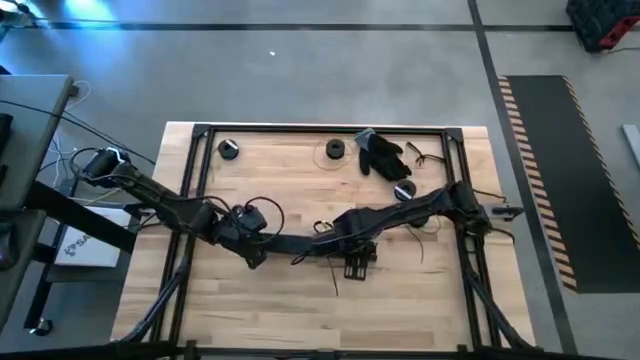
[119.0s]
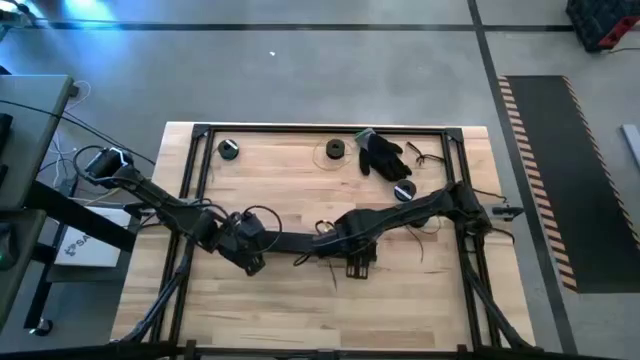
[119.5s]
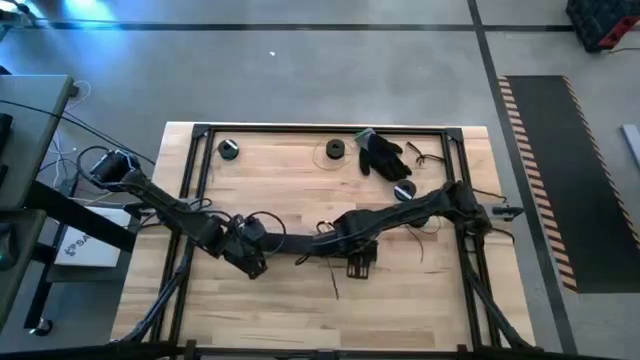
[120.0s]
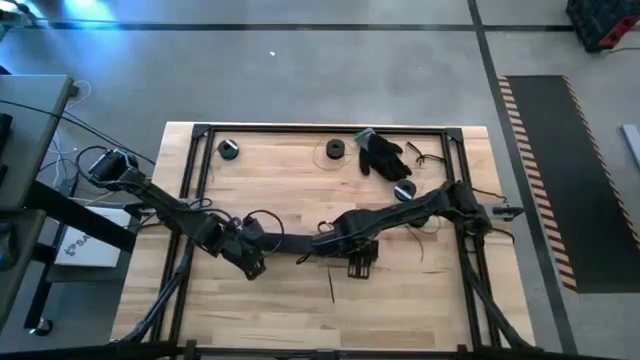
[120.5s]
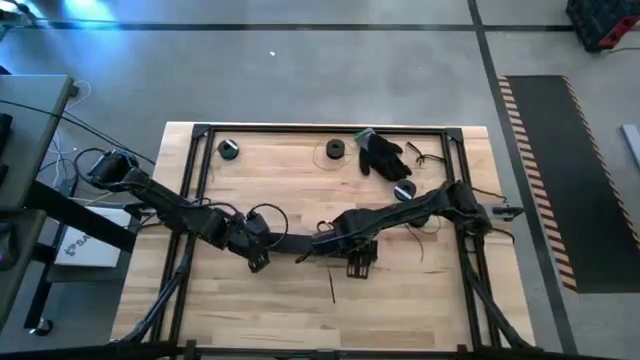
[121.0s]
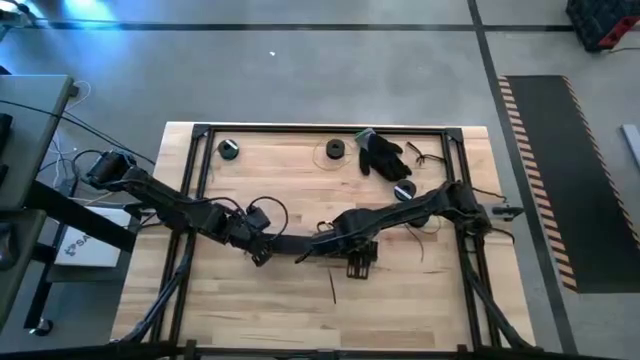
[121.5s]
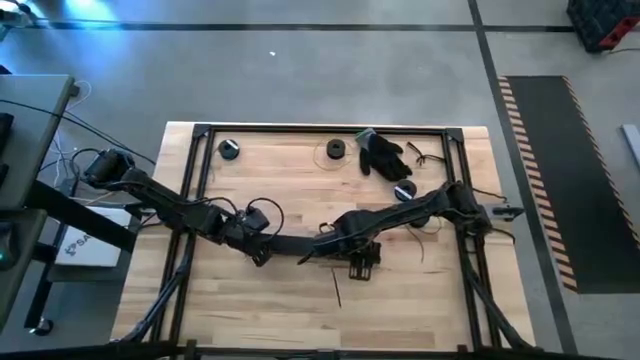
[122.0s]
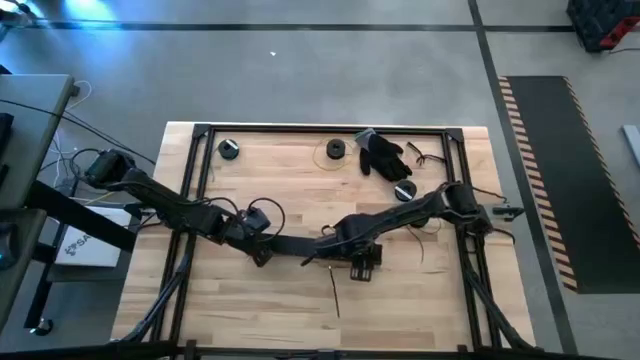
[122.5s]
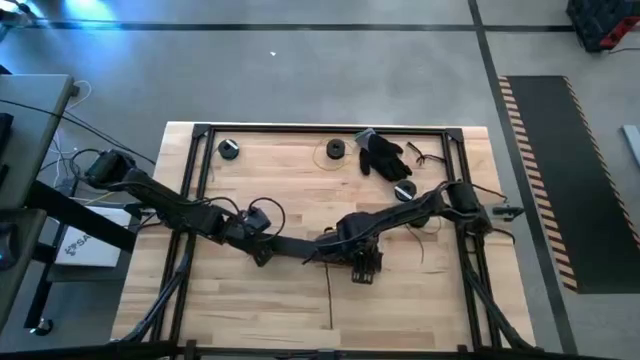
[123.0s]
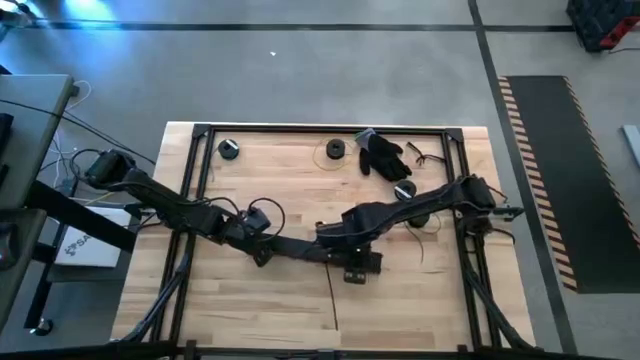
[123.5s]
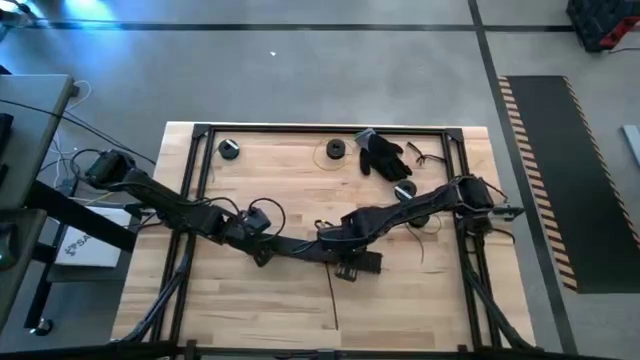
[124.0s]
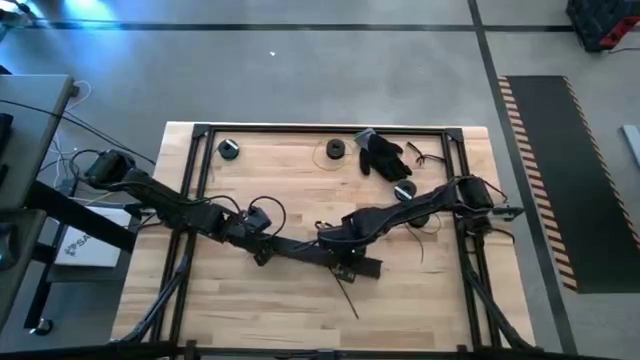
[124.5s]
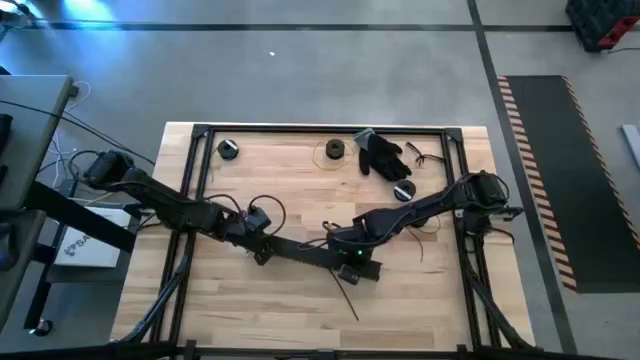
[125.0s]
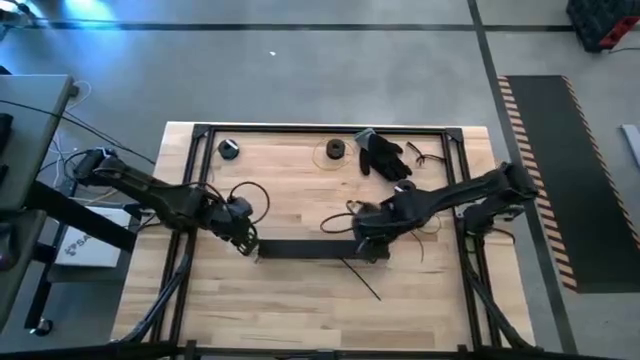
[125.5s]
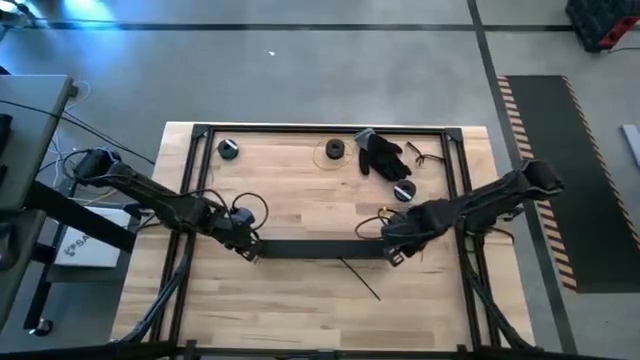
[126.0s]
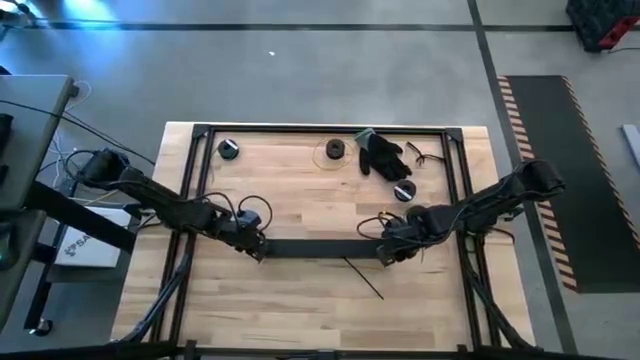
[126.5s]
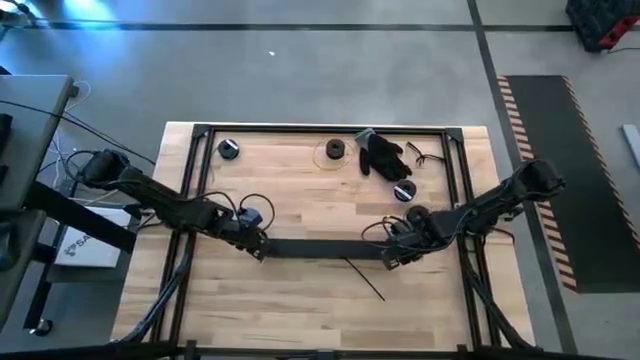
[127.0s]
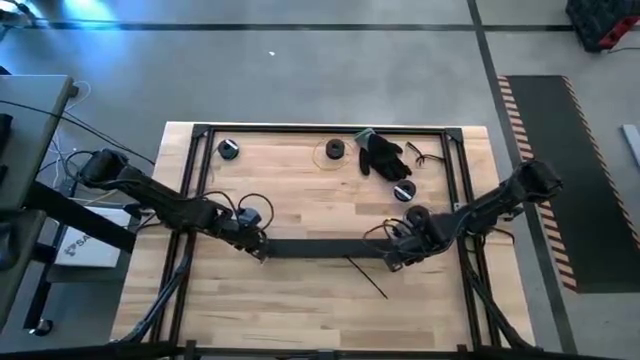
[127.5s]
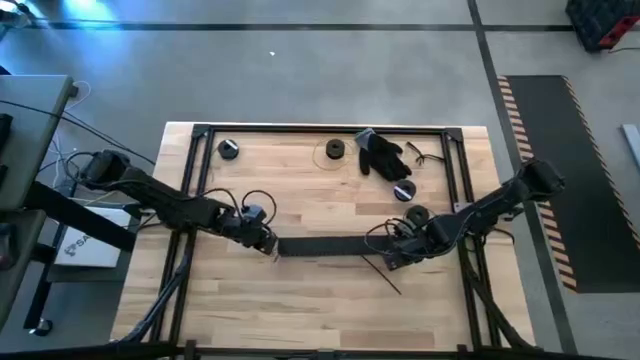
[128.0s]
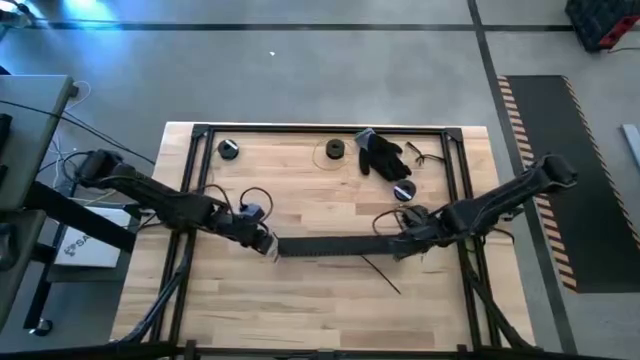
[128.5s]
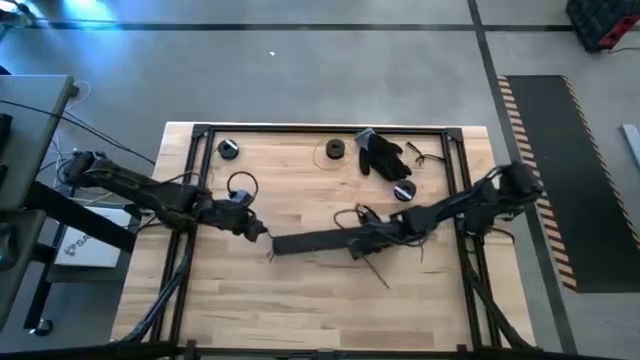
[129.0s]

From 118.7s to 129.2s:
Task: Ziptie cables
Close the black cable duct

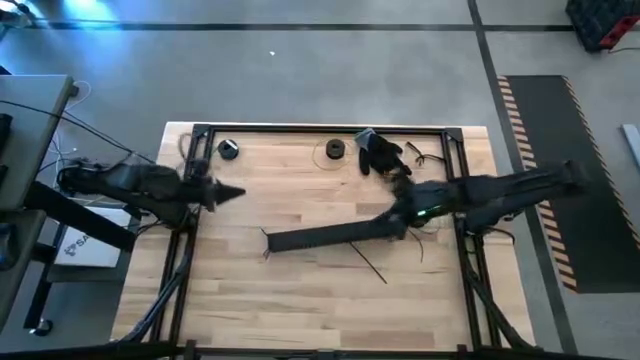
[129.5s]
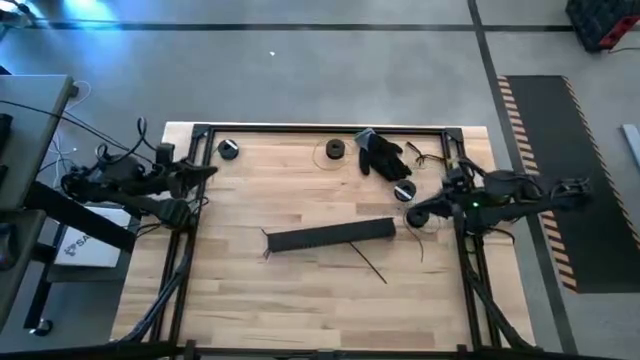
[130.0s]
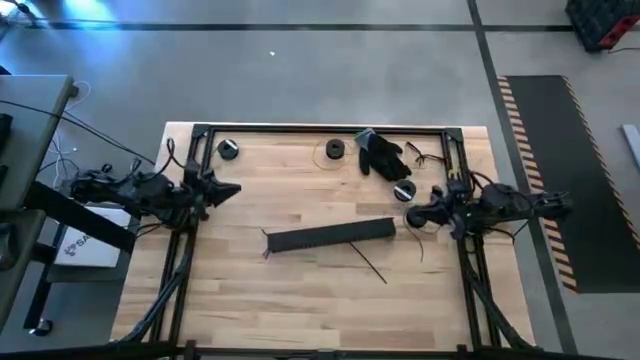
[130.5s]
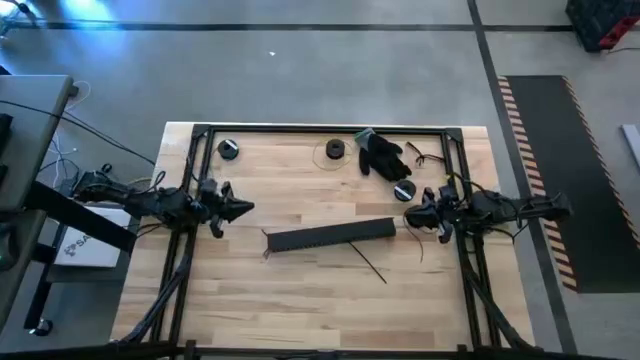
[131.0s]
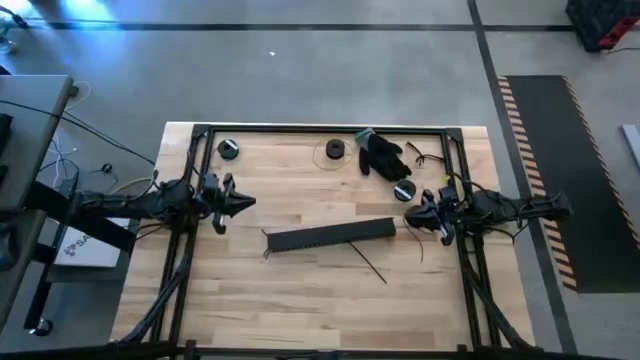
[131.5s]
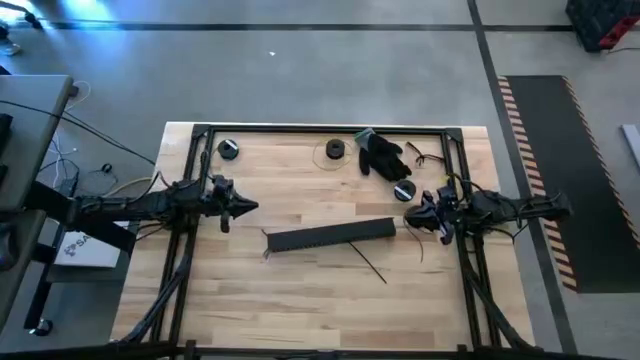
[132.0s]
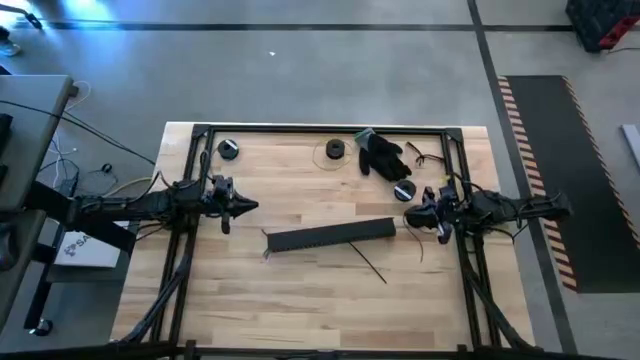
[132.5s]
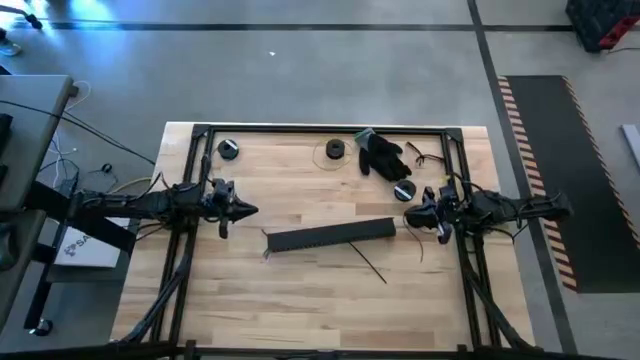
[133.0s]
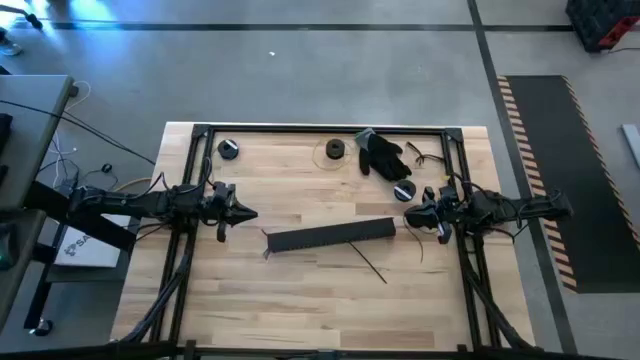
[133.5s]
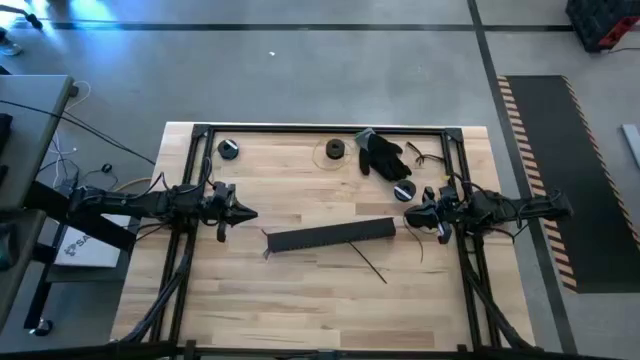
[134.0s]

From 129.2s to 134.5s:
Return to Home Position

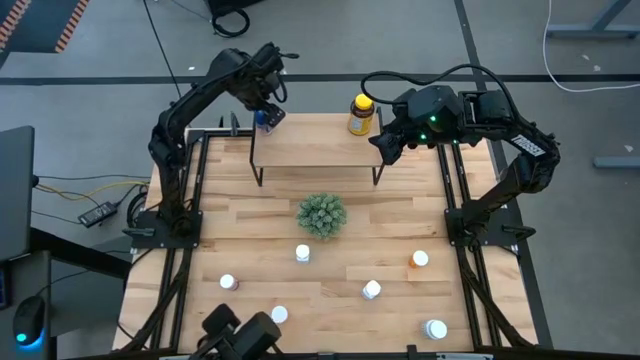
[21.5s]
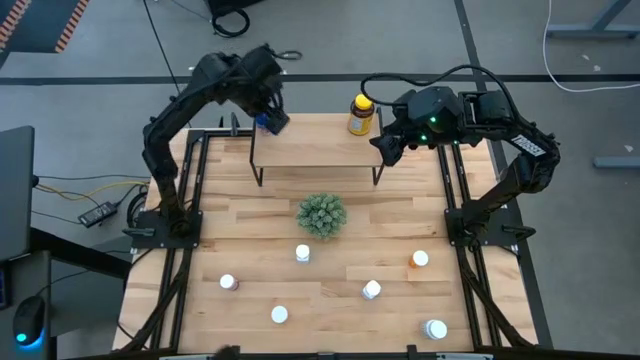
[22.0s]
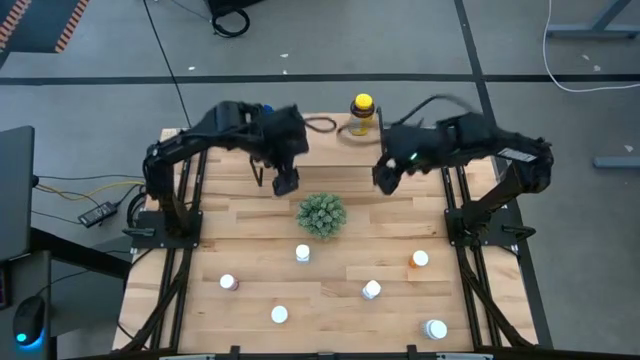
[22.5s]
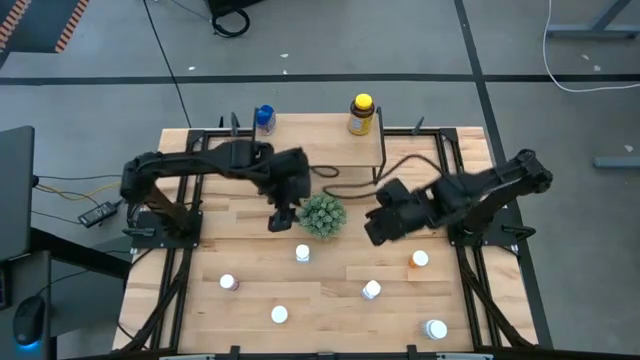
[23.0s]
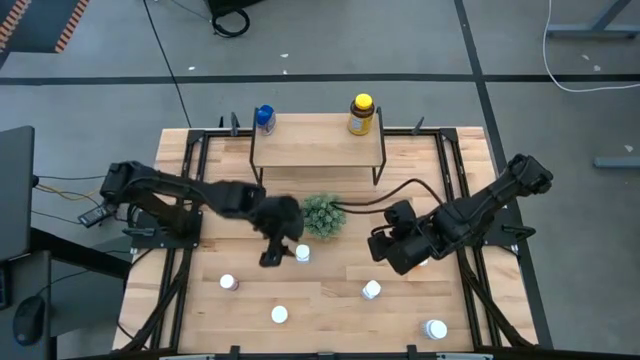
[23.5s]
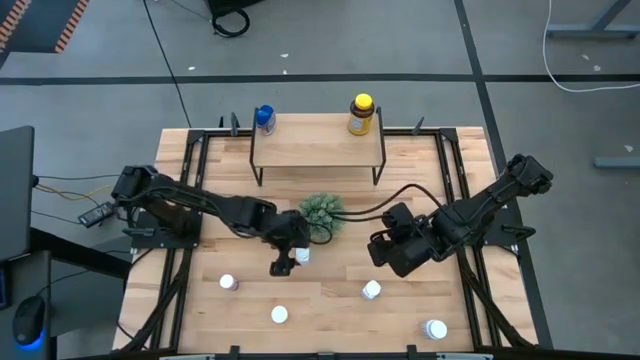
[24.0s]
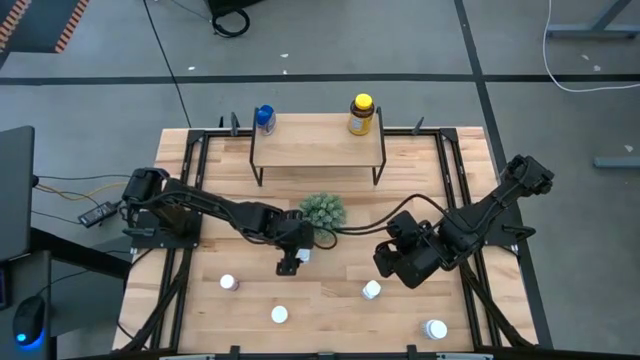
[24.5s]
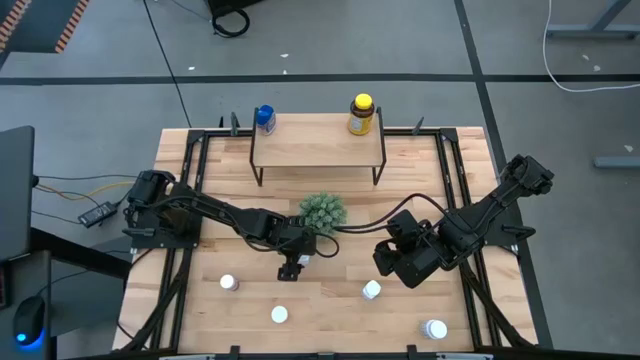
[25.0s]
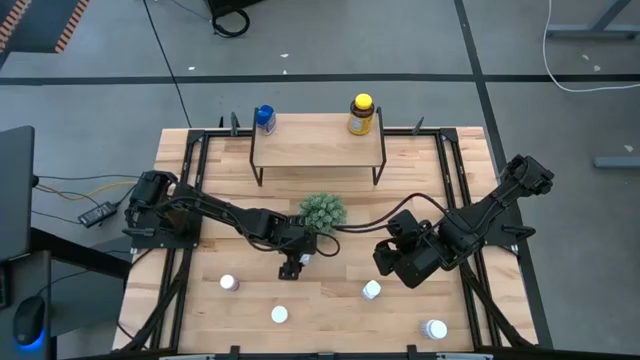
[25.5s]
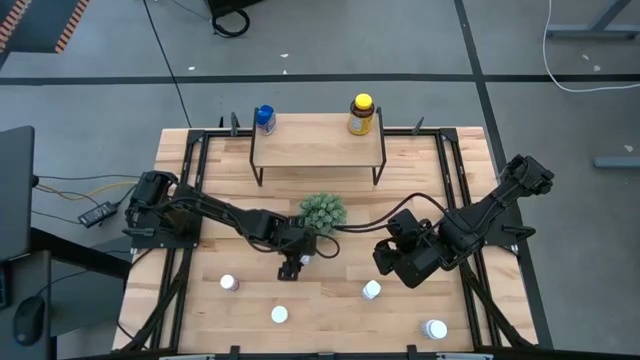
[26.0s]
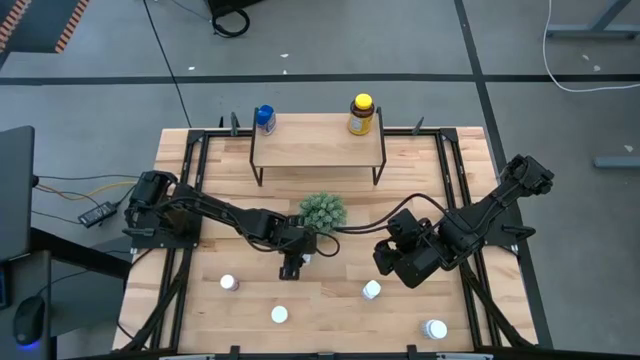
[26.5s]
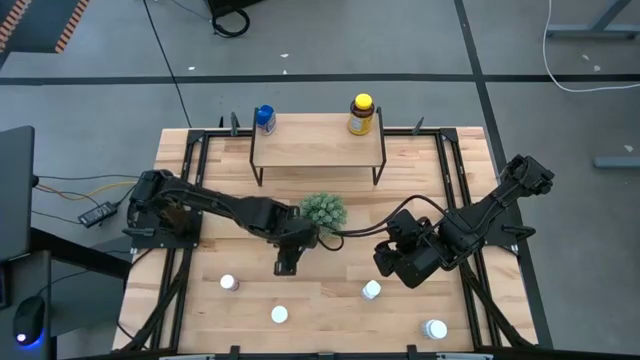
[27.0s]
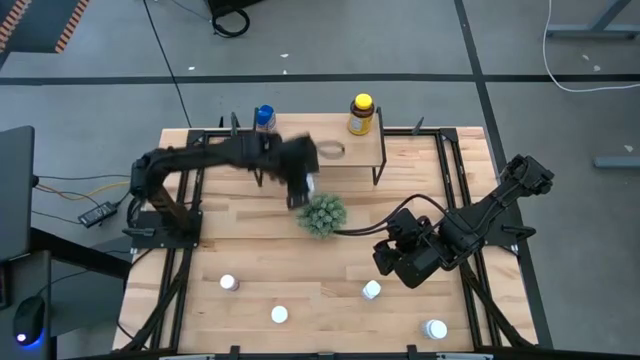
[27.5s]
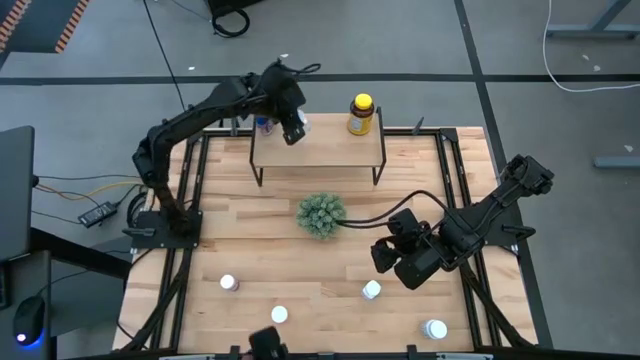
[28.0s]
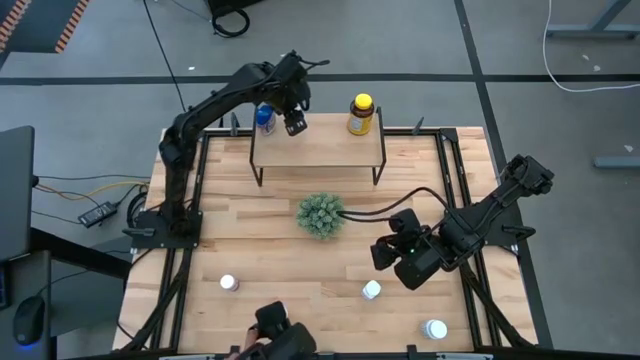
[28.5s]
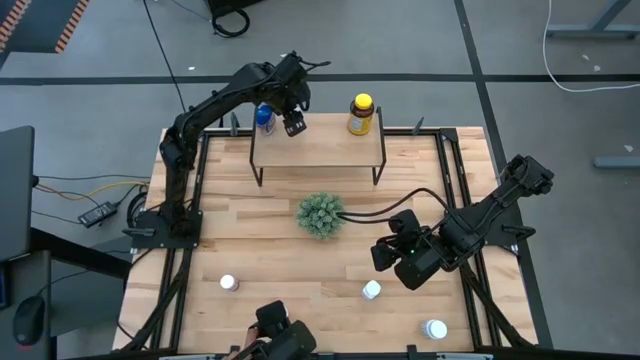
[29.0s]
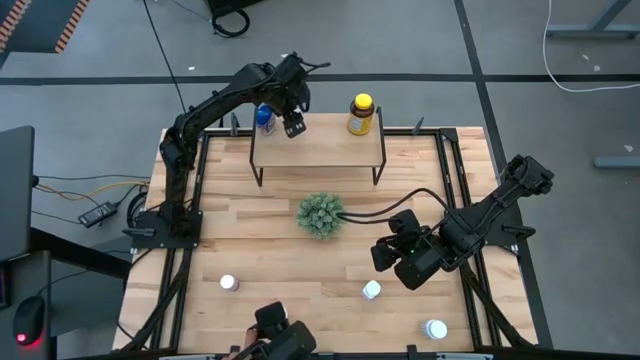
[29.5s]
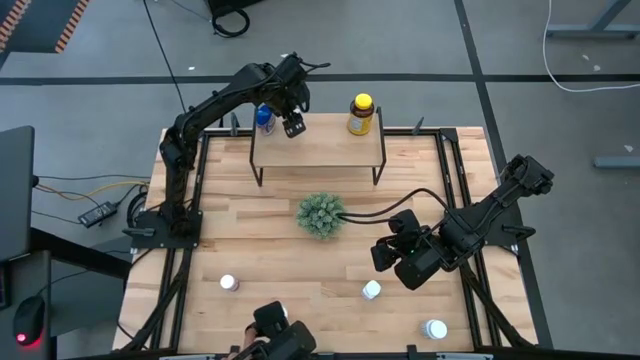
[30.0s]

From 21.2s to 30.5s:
Task: Pick and place medicine bottles onto shelf by color
Put the top white and blue medicine bottle on the shelf
